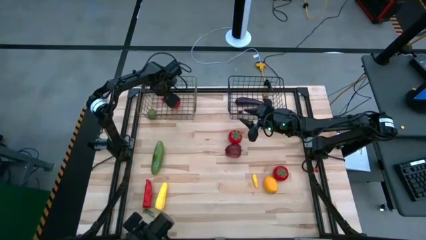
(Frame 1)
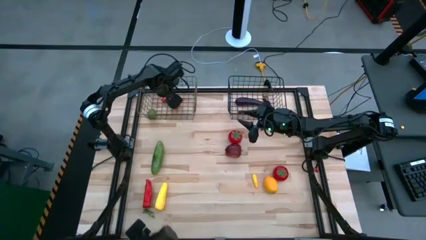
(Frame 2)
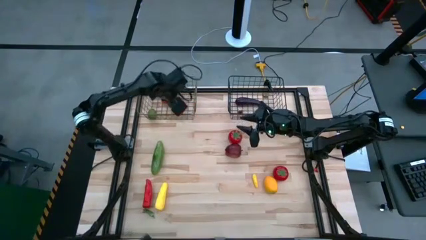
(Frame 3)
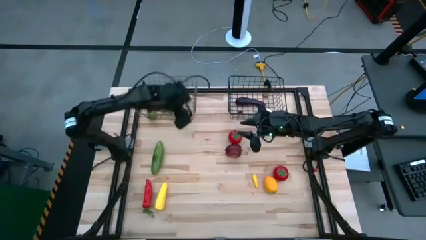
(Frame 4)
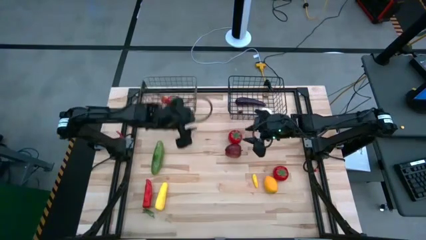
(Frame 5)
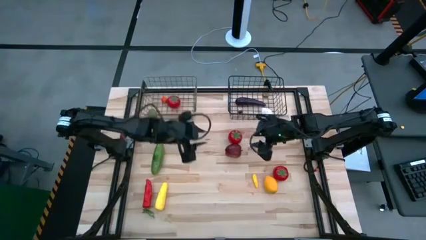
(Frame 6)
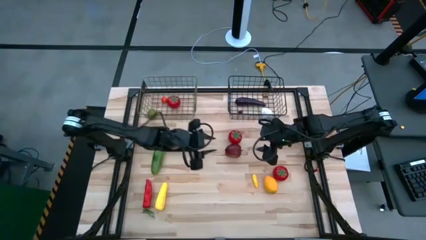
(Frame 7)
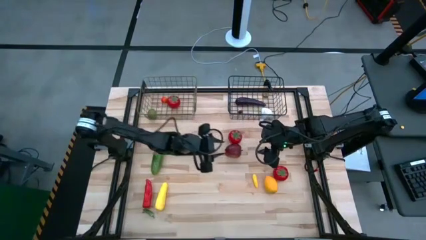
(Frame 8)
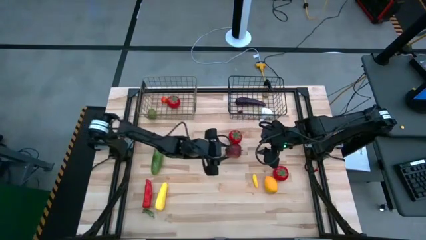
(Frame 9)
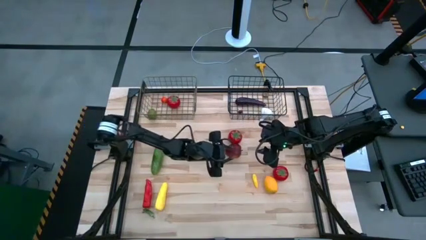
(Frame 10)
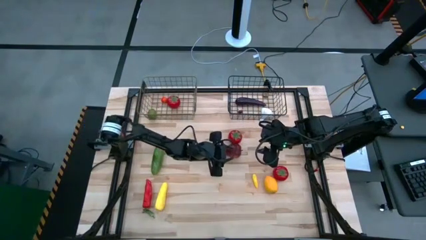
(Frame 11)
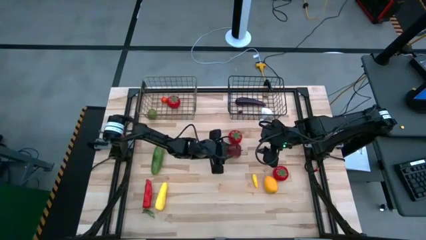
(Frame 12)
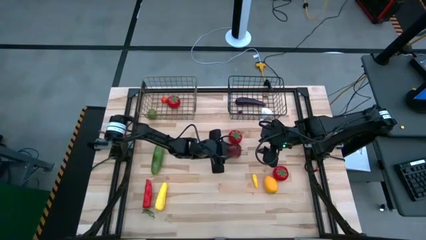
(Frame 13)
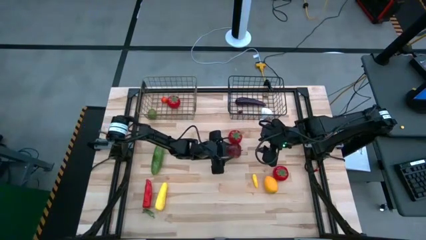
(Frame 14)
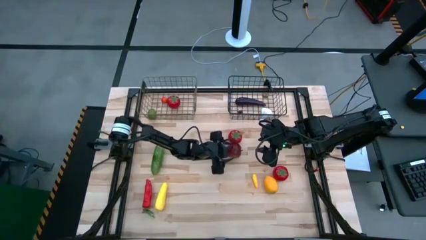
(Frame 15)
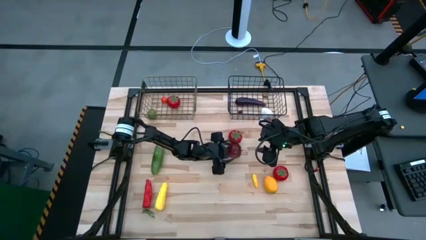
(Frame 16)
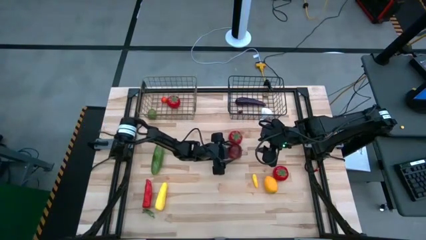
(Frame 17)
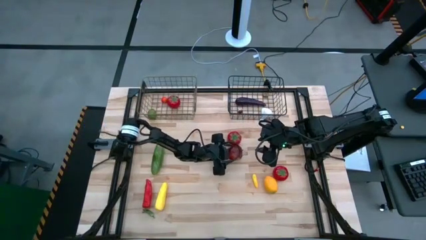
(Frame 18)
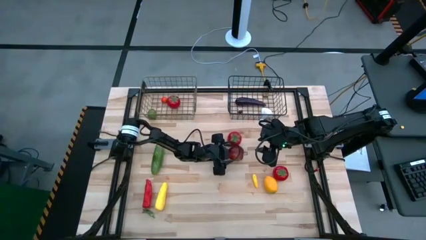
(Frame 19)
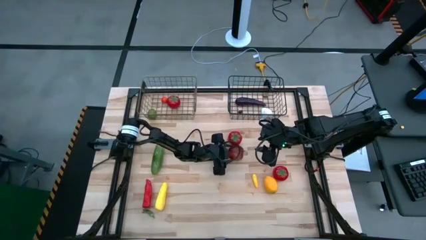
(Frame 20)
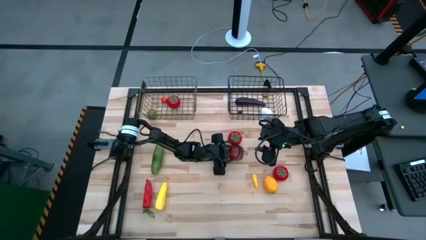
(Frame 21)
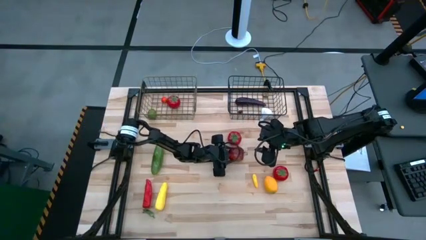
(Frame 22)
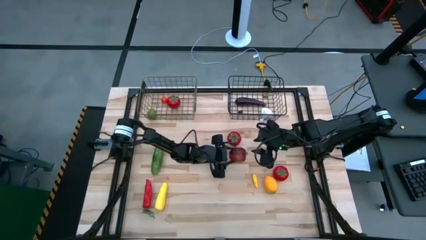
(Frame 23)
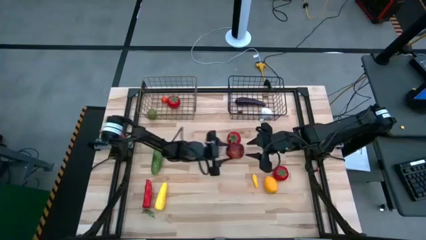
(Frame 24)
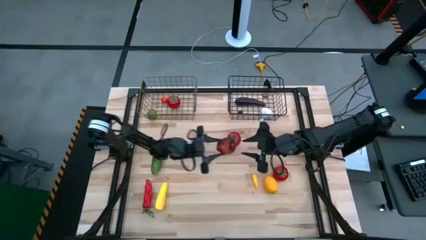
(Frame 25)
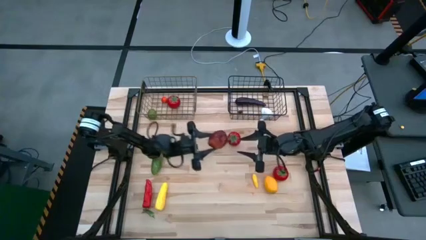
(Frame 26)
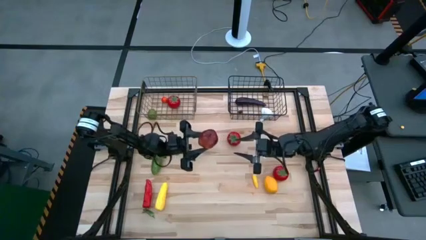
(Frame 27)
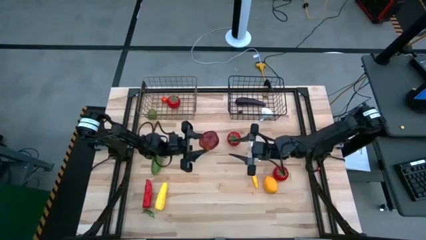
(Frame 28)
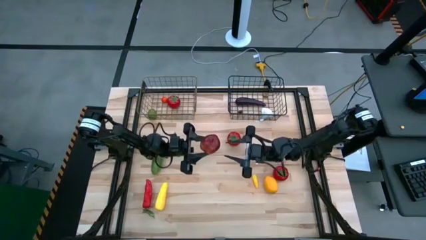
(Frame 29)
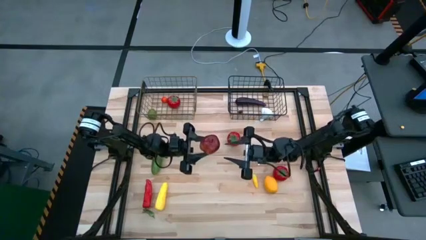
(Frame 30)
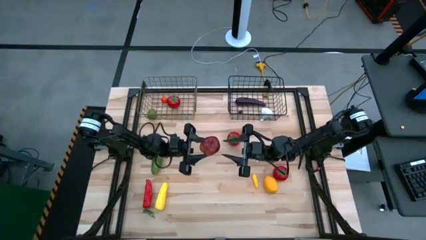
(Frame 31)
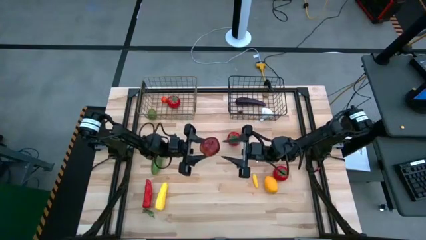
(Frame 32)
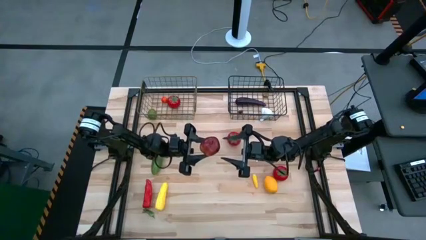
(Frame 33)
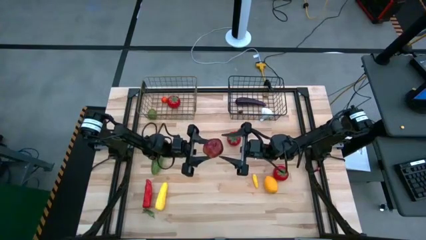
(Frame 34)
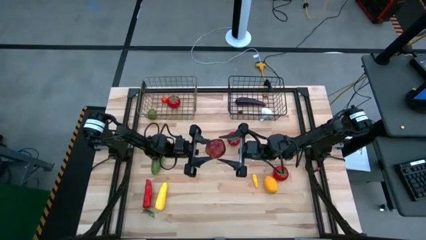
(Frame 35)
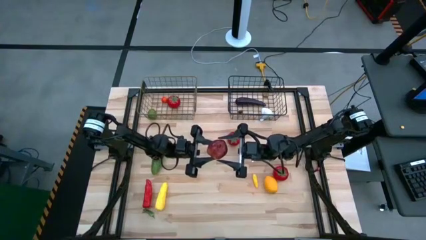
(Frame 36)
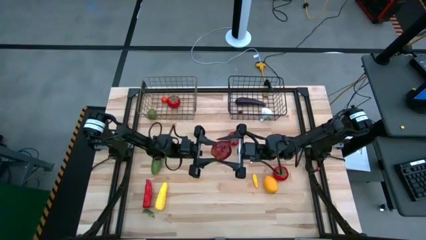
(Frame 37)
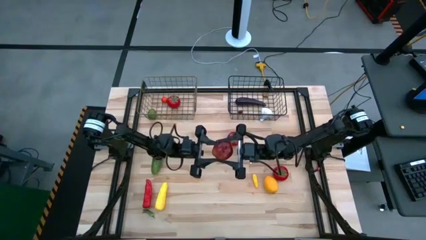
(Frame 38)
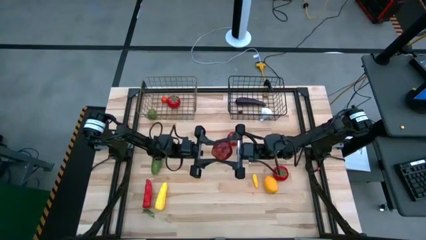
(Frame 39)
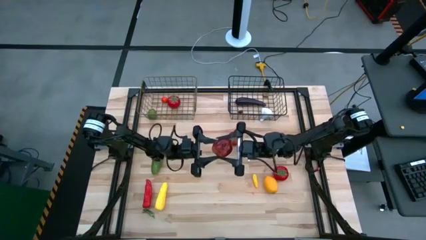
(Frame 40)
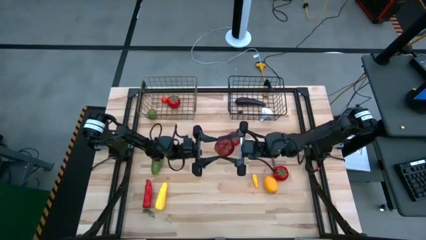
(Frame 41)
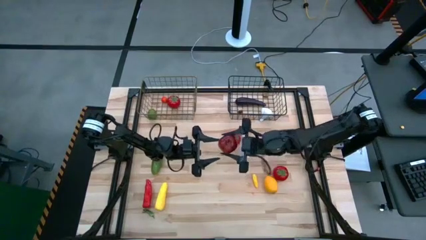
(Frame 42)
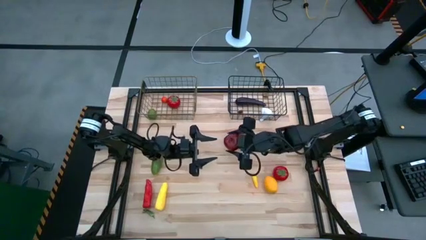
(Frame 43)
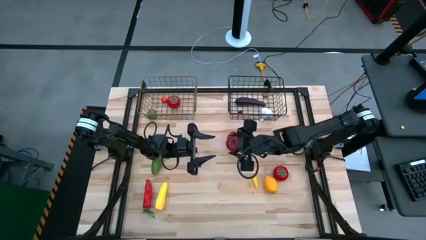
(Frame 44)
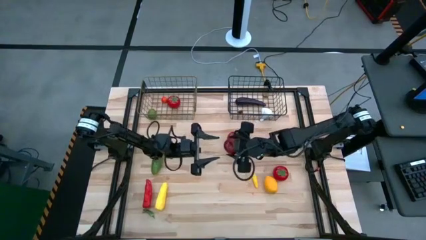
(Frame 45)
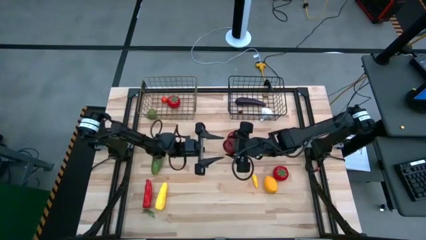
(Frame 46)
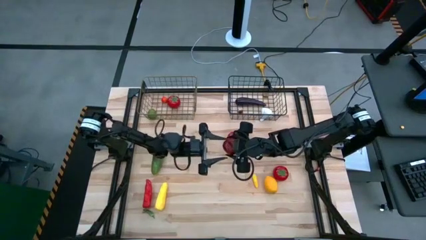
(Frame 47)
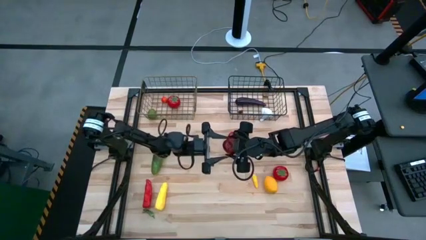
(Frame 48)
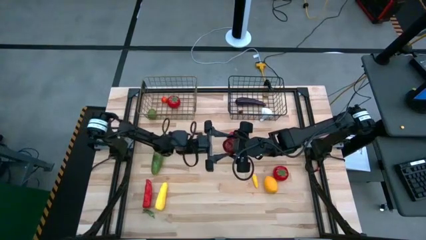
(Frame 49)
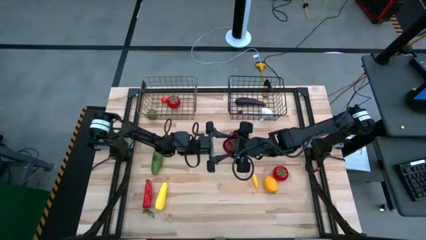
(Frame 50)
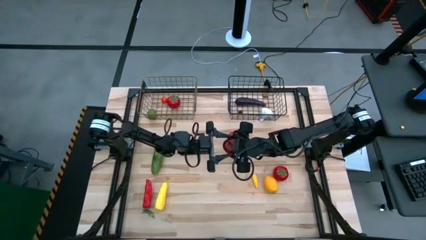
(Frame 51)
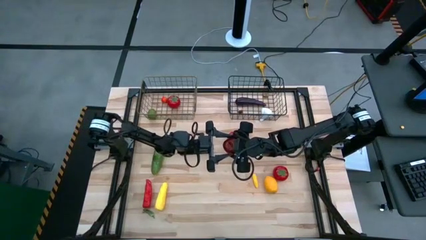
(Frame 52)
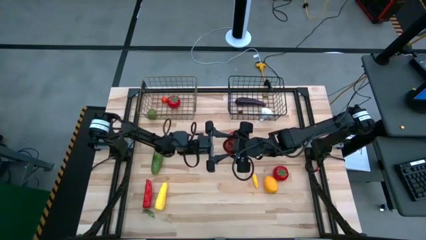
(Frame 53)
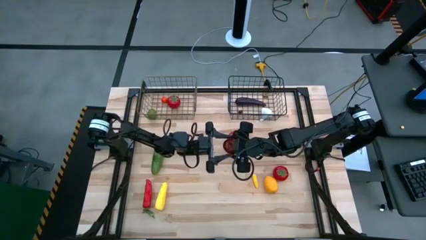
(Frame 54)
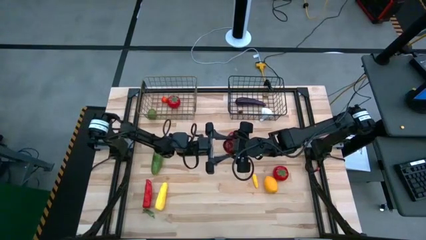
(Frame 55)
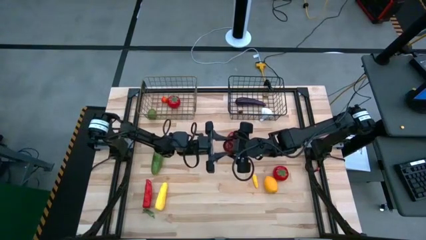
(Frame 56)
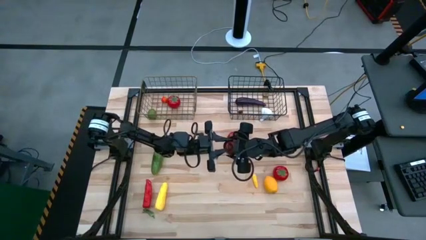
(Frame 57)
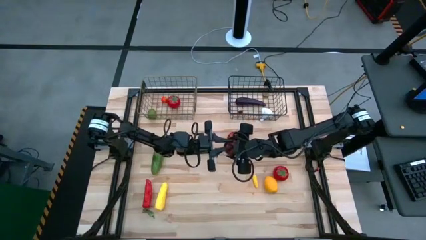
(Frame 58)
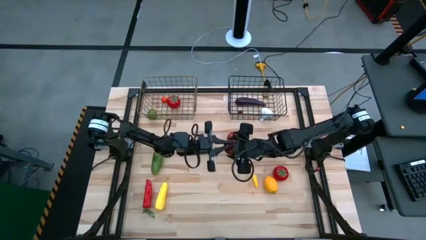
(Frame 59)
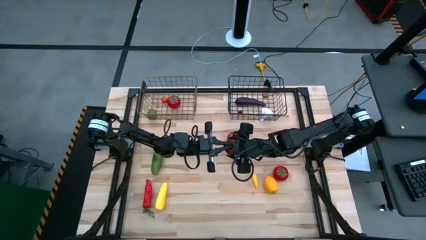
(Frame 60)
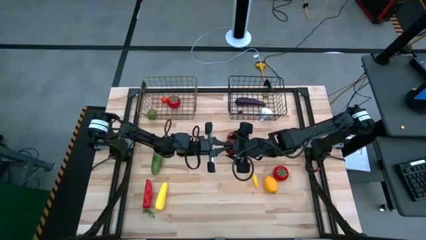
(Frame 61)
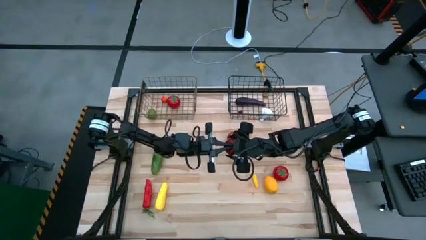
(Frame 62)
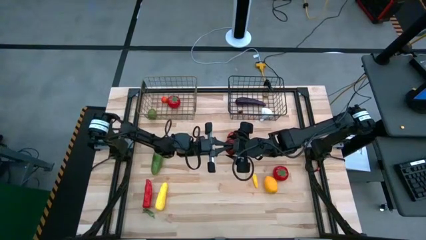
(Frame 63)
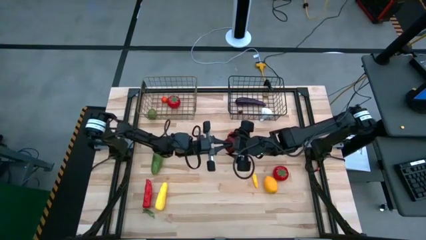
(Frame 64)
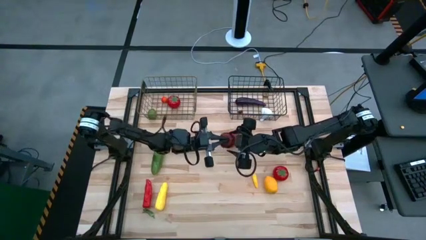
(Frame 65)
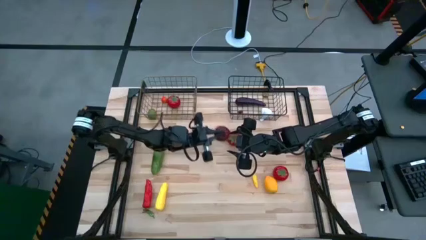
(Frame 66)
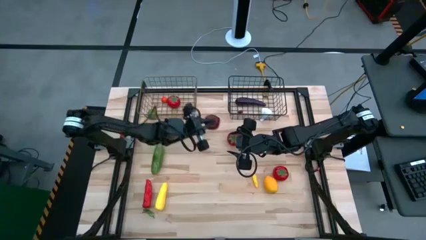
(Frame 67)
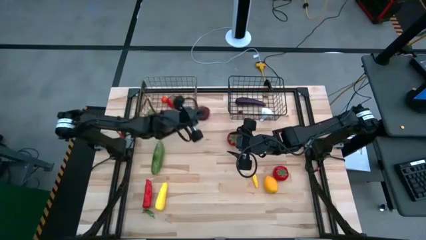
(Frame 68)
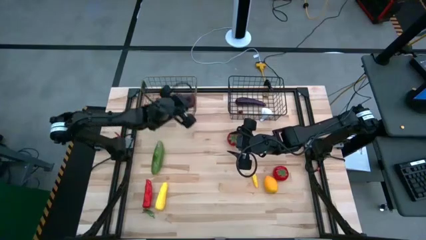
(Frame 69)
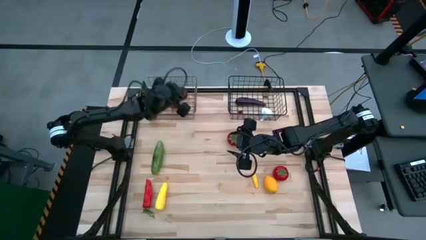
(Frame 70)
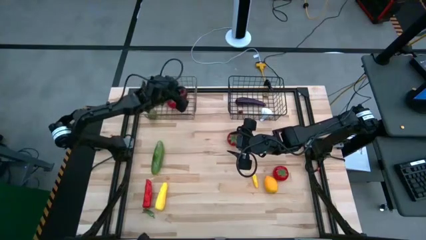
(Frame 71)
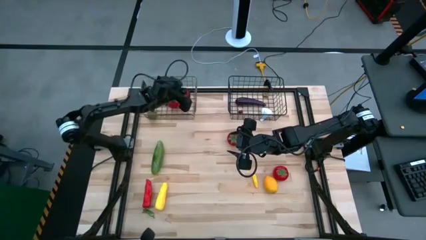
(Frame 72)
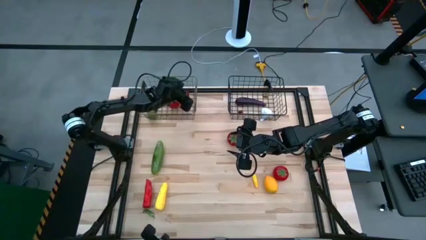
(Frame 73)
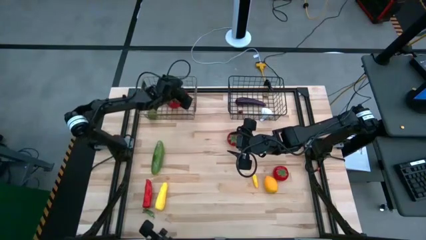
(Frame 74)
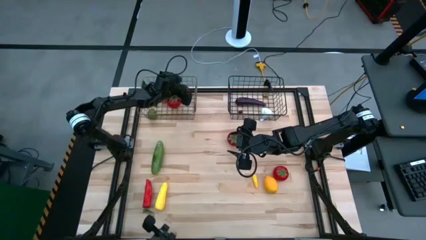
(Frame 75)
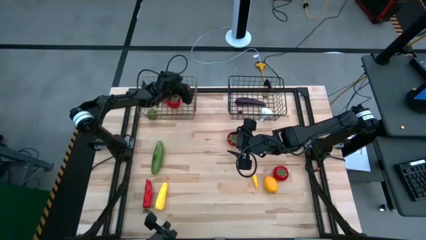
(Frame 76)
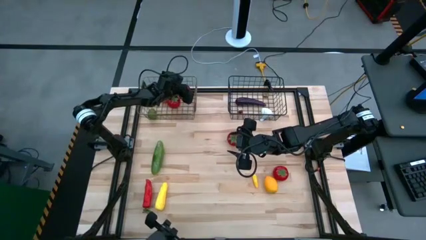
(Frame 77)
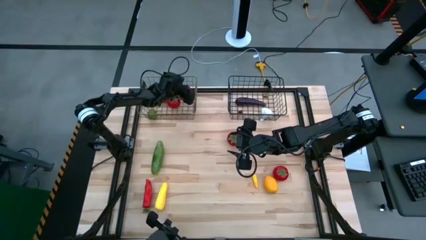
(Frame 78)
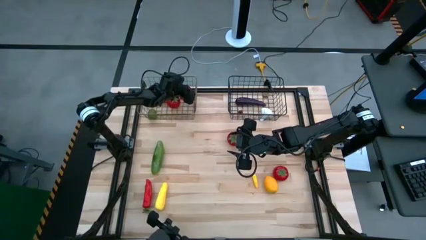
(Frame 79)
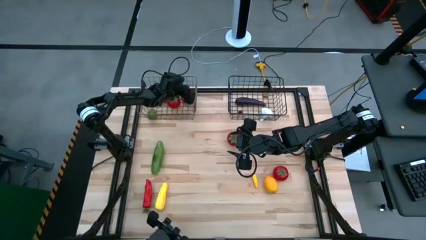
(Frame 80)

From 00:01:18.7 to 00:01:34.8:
Task: Sort produce into baskets
Put the apple into the left wire basket
